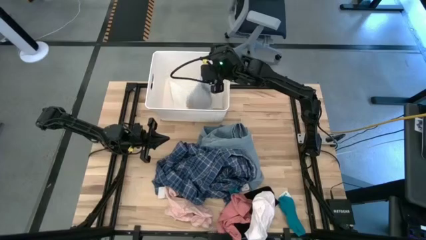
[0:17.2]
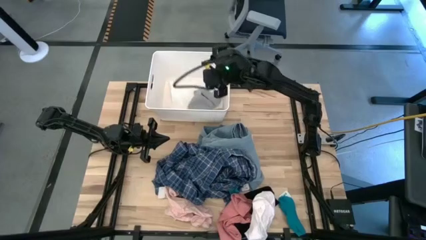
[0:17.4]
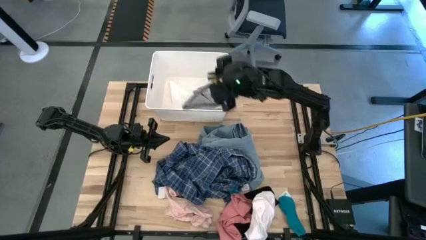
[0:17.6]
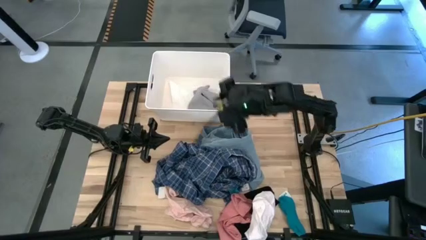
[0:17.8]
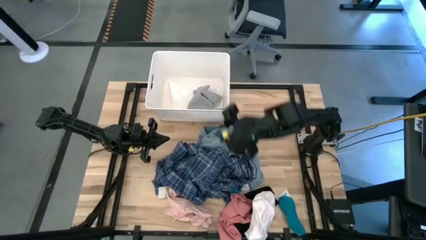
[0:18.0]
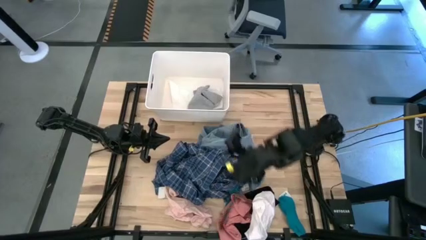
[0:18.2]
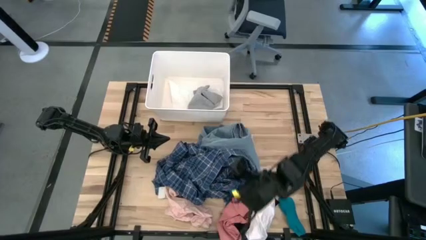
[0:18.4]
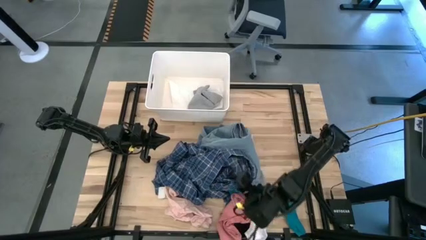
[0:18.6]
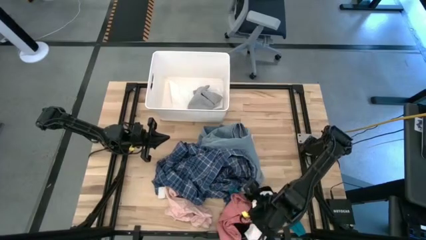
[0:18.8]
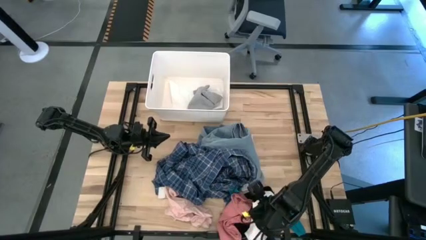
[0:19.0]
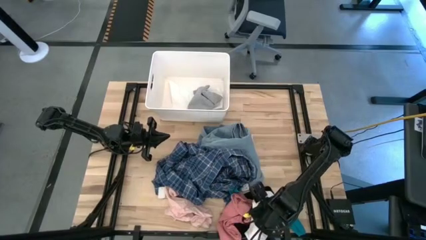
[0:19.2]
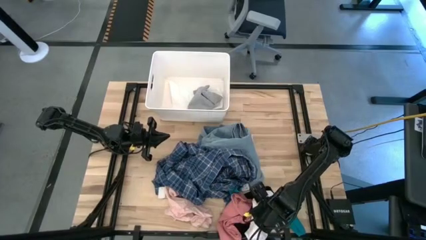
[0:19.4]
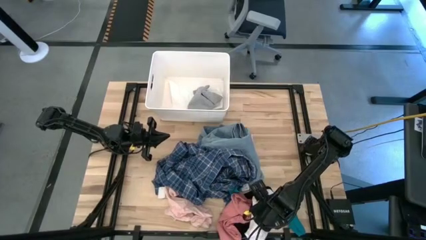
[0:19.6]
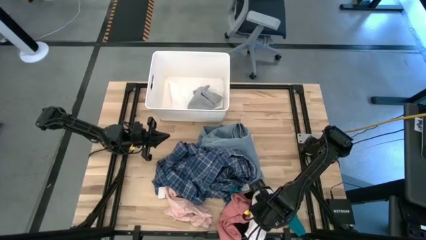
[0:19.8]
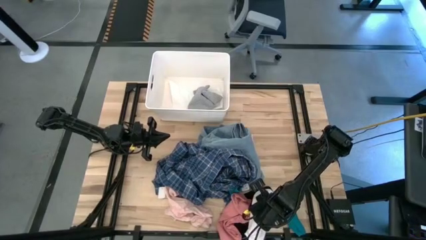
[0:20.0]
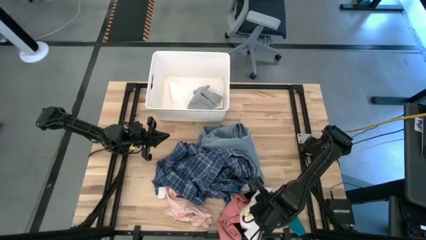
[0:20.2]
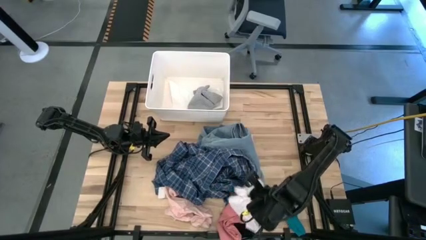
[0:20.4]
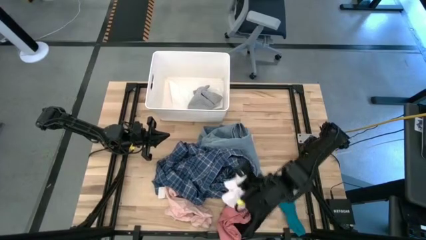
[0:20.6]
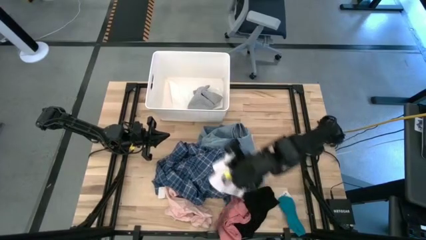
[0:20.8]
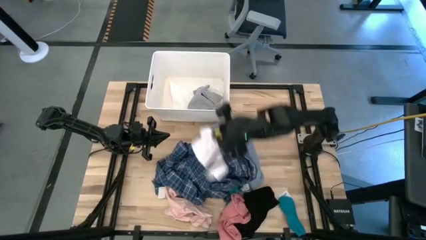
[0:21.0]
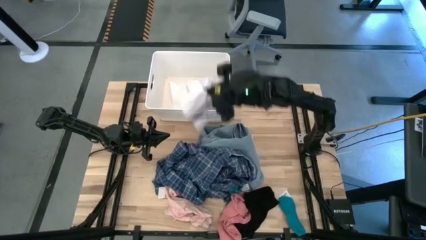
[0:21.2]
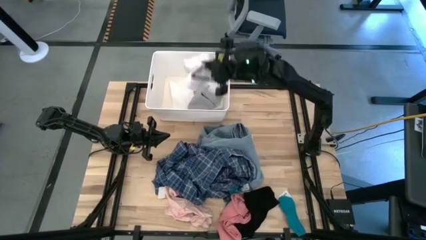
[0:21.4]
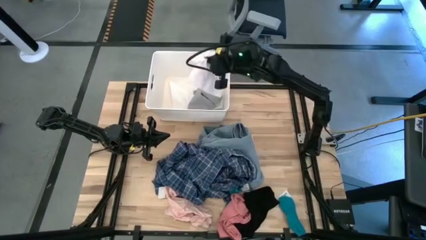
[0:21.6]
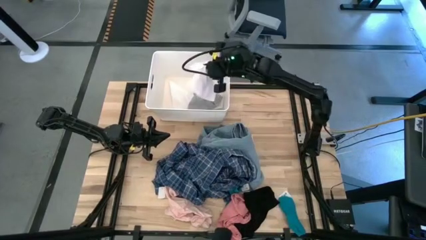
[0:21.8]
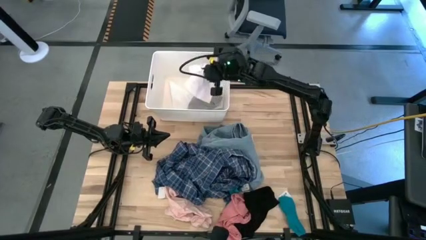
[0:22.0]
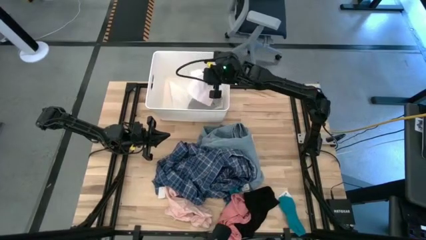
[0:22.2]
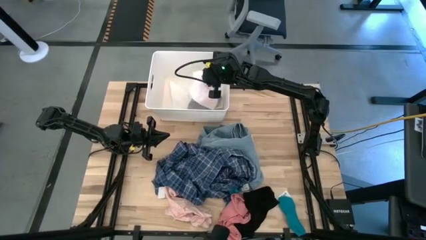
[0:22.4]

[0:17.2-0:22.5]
Task: Sort clothes
Put the white underwear into the white bin

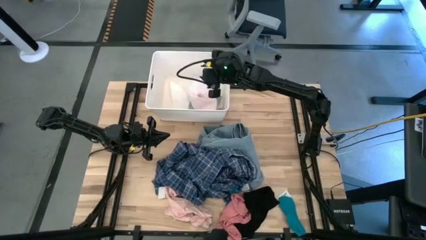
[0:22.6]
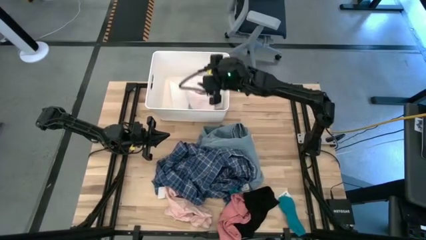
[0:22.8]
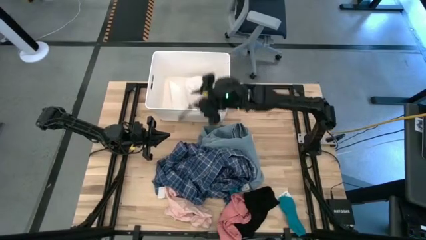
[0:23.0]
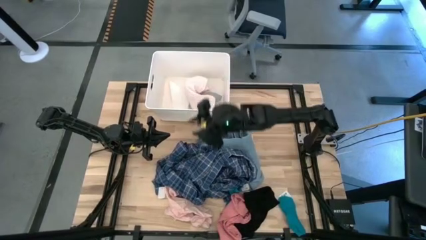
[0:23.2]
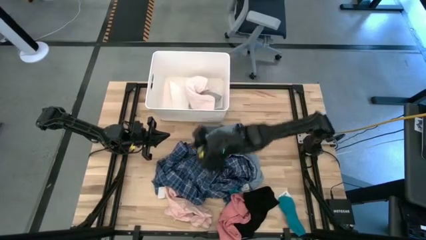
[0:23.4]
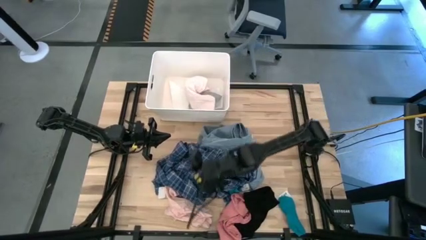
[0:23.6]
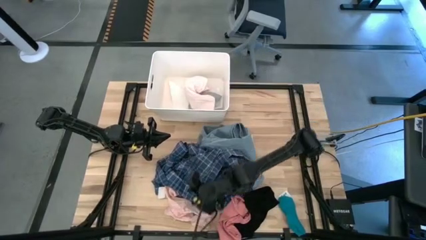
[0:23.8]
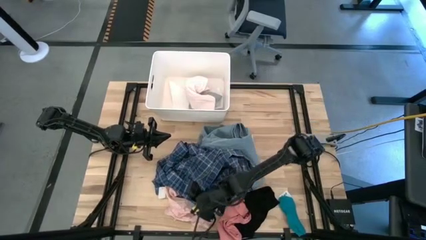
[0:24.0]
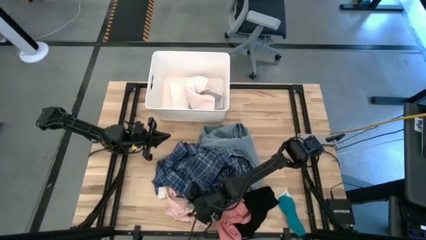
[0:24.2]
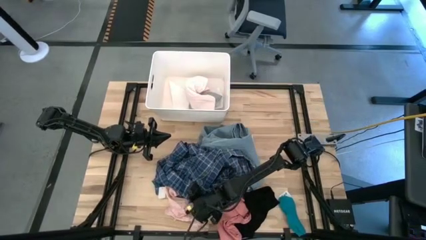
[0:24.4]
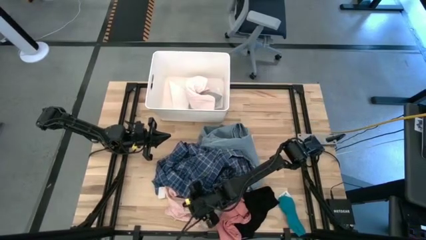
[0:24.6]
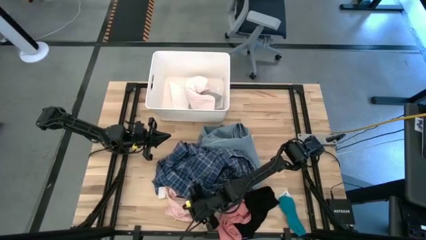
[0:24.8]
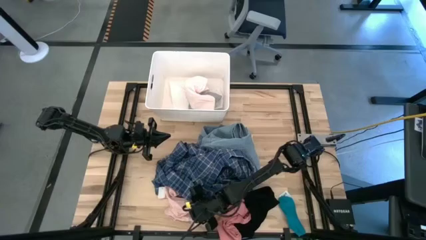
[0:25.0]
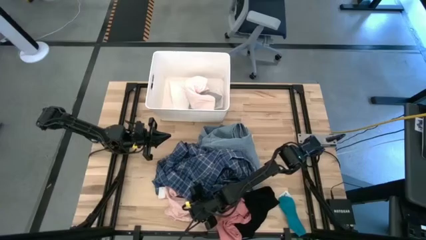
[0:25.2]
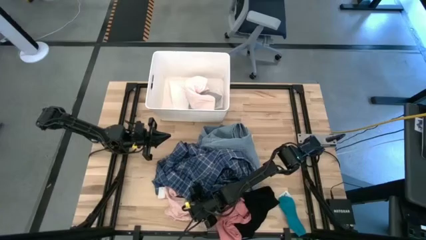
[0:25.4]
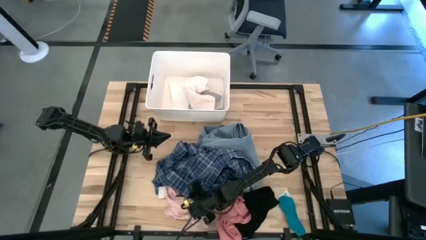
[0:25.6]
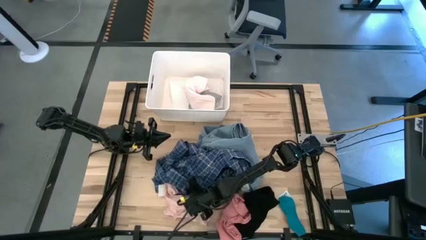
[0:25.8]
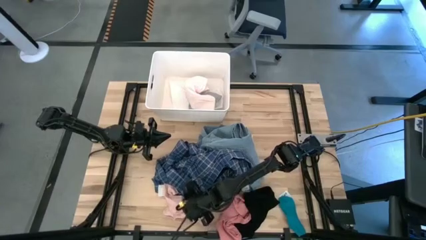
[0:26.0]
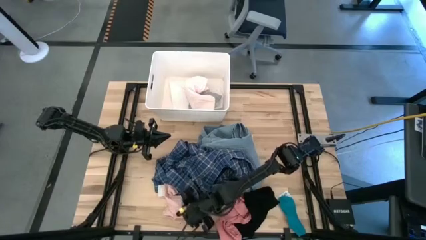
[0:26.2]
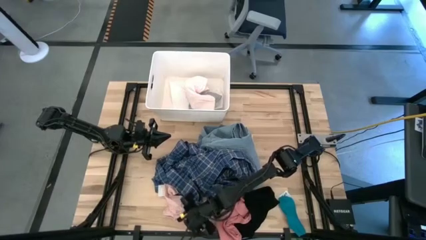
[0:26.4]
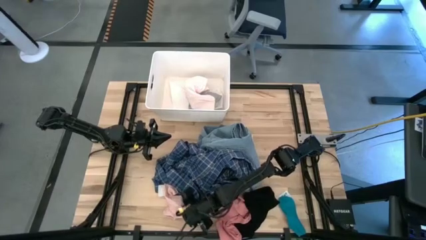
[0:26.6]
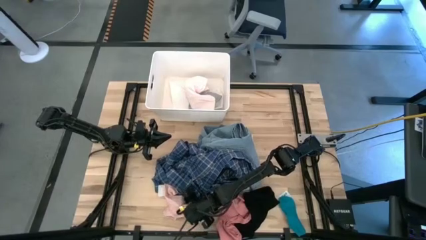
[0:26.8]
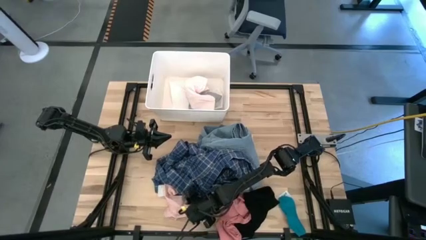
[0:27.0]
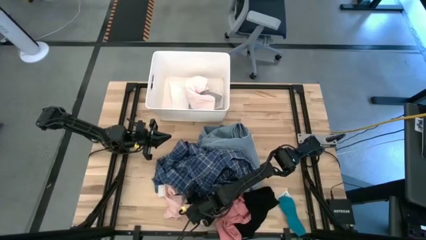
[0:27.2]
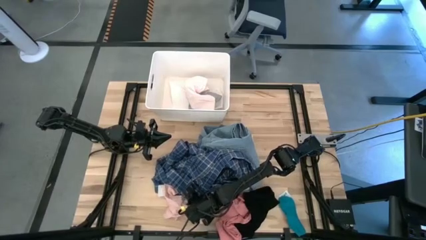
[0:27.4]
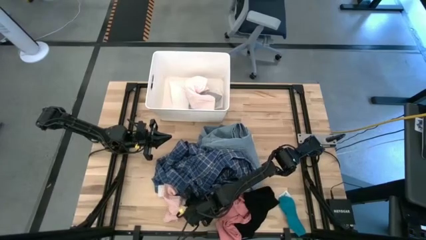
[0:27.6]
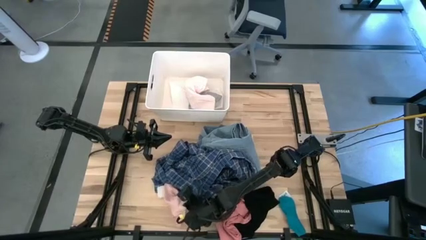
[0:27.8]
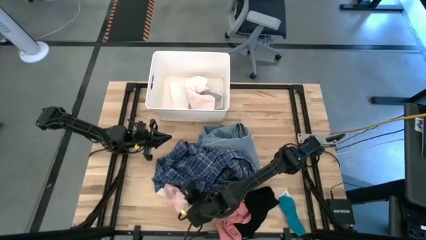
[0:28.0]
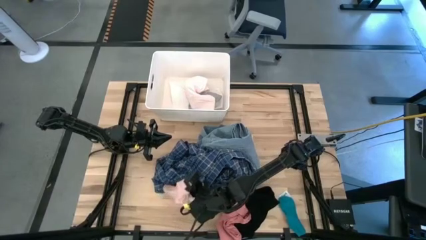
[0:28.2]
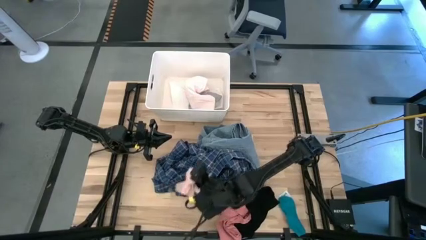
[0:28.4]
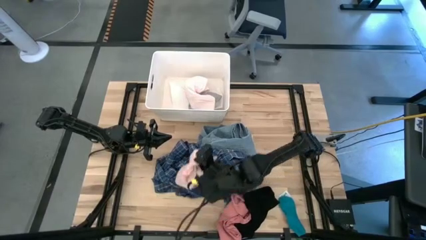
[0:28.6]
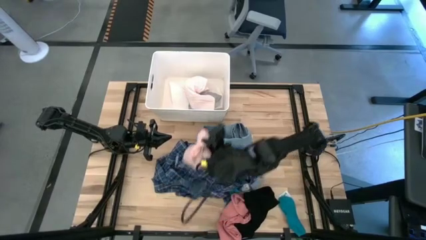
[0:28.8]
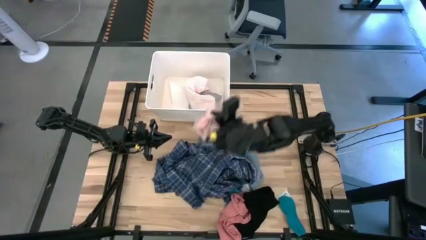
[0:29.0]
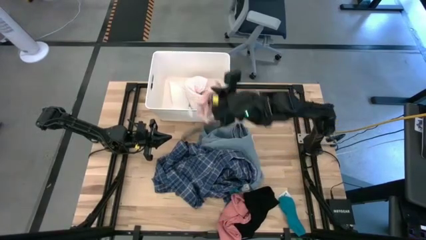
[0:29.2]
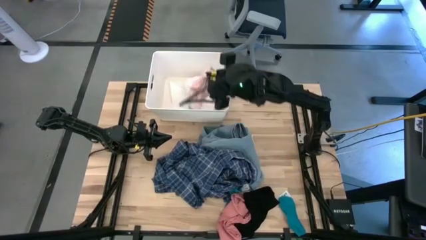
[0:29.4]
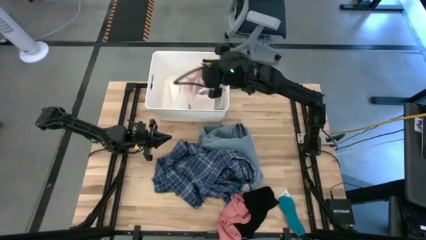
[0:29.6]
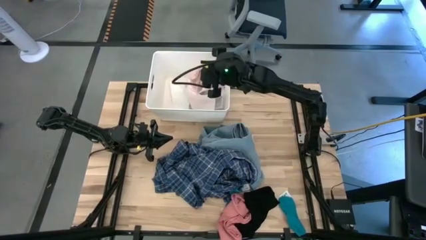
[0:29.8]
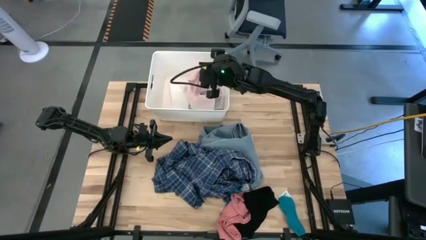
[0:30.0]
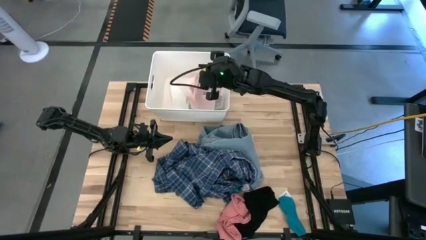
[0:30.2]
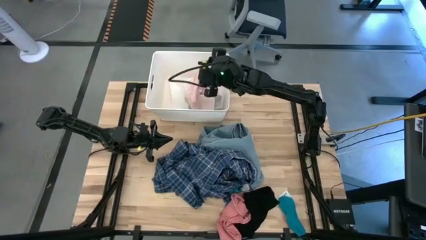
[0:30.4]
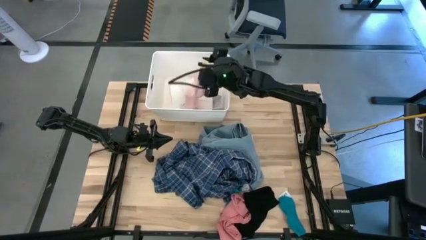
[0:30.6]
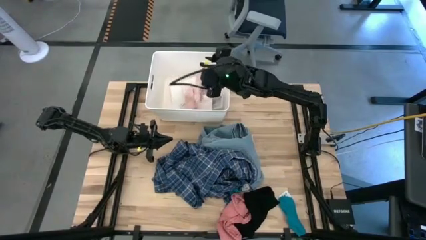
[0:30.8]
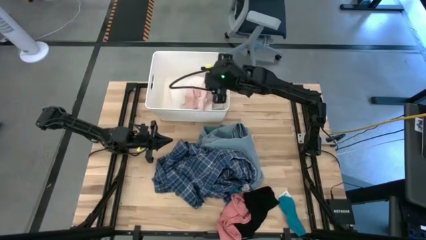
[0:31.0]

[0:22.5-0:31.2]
Put the light pink underwear into the white bin

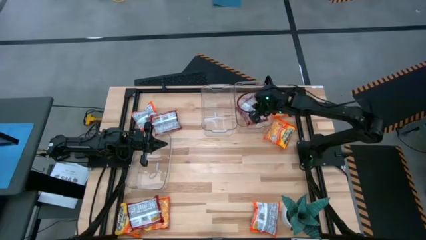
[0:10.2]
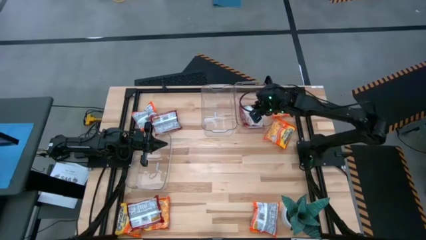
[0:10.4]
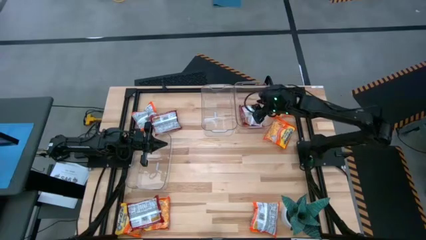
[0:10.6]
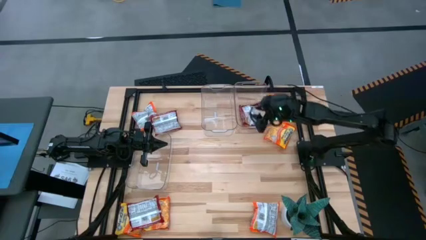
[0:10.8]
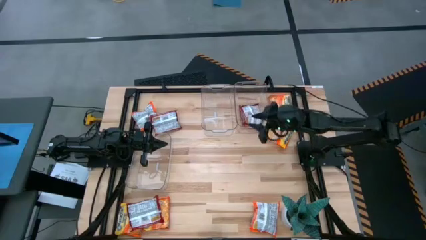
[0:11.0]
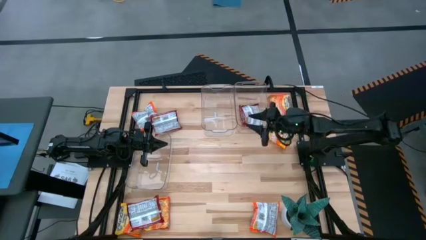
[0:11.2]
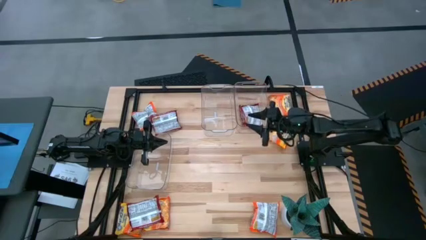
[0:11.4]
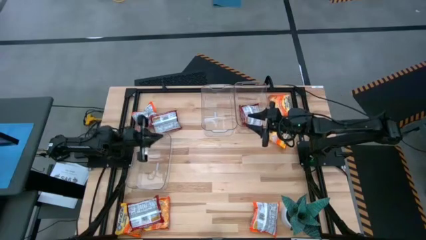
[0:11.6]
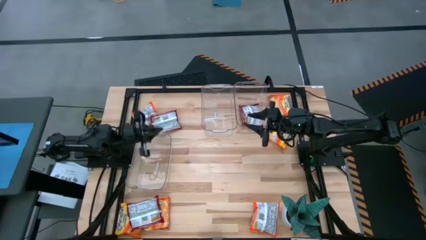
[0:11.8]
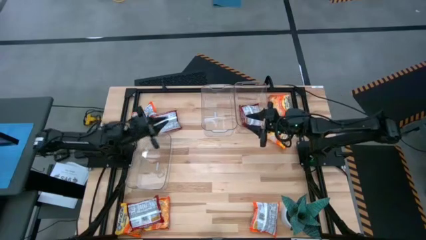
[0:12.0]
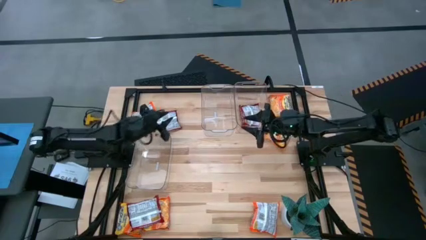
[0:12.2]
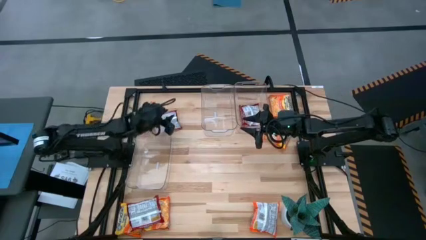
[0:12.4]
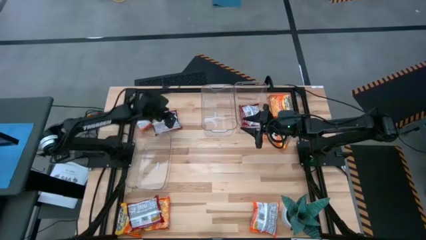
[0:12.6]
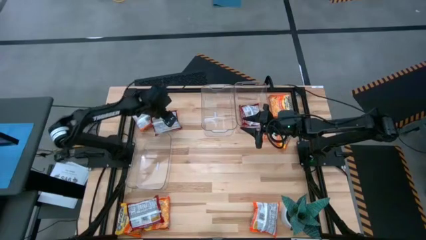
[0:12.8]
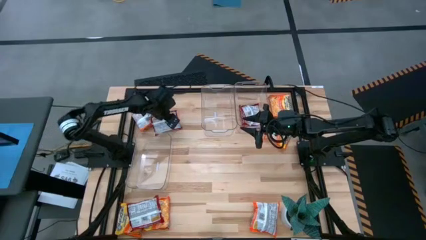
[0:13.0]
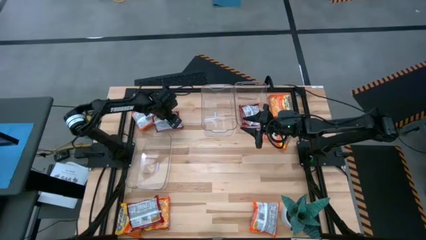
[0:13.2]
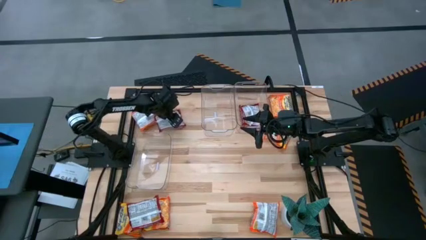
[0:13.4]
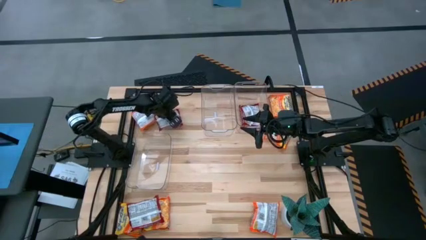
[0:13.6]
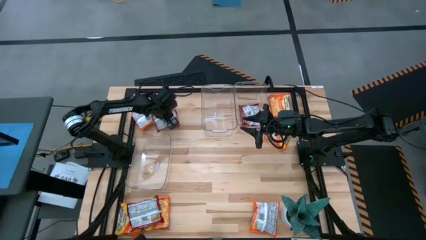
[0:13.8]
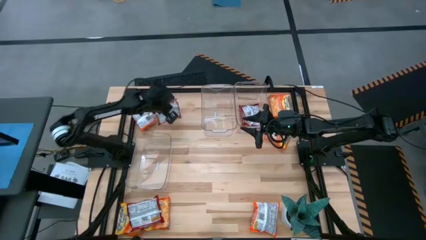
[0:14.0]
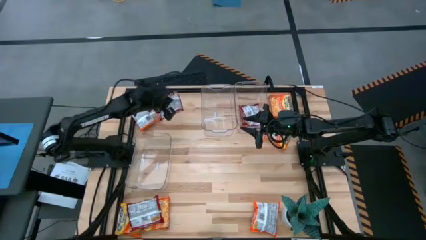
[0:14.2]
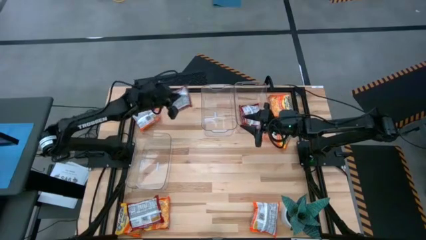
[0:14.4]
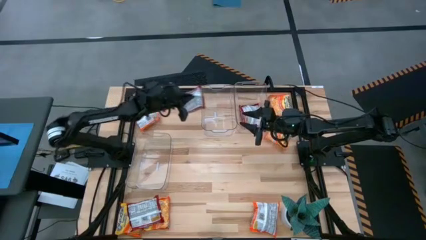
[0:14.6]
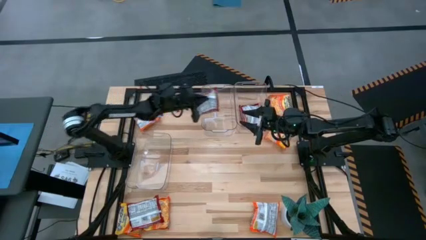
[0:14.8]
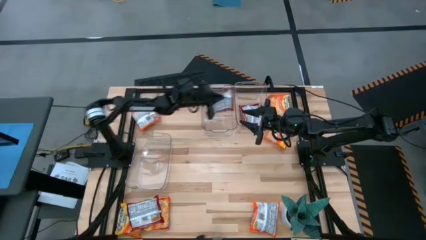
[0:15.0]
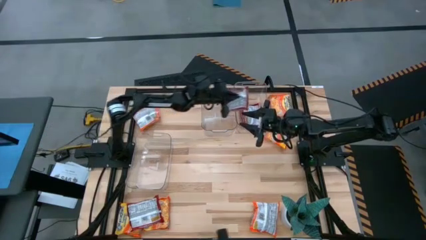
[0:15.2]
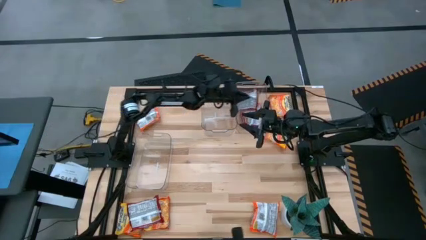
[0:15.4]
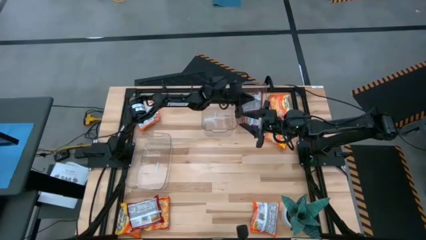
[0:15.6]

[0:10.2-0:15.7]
Task: Sort Maruchan noodles
Put the red noodle pack into the top right transparent bin
